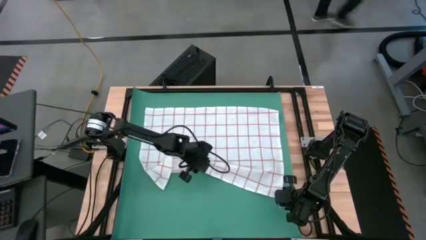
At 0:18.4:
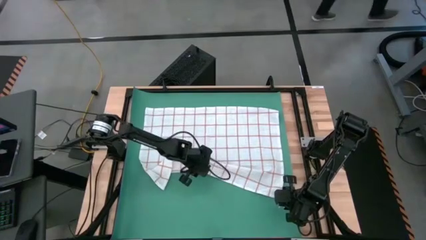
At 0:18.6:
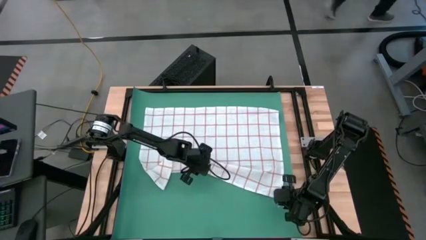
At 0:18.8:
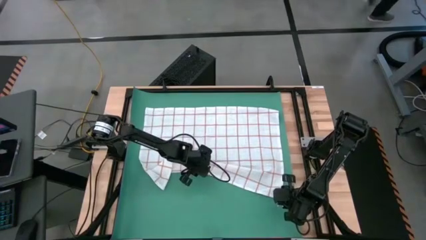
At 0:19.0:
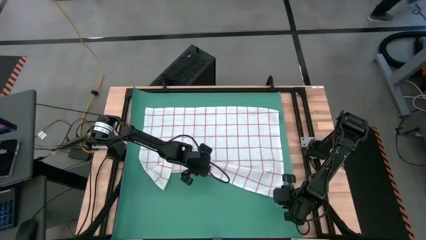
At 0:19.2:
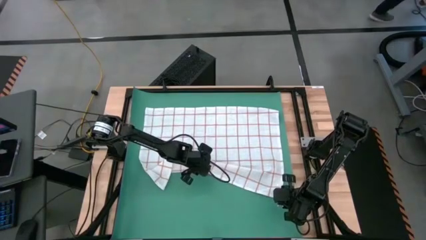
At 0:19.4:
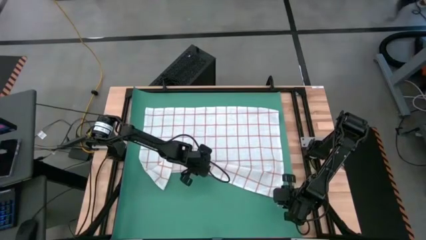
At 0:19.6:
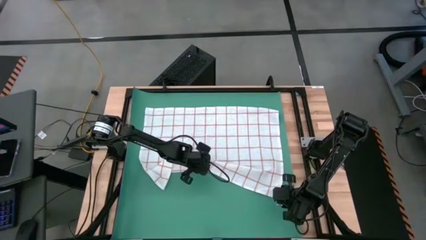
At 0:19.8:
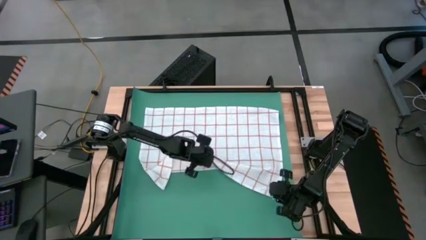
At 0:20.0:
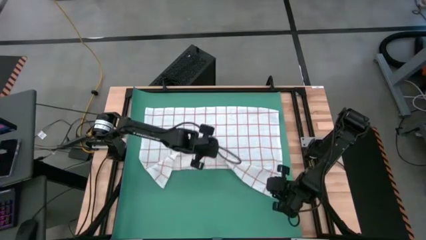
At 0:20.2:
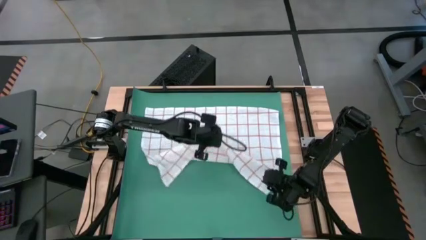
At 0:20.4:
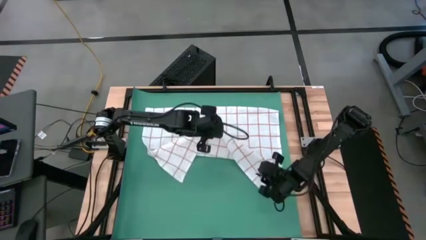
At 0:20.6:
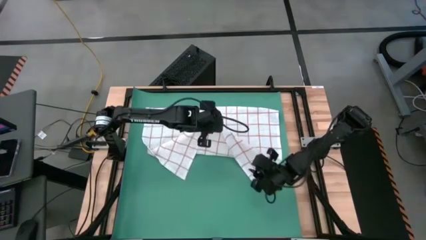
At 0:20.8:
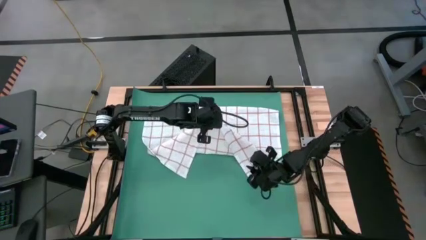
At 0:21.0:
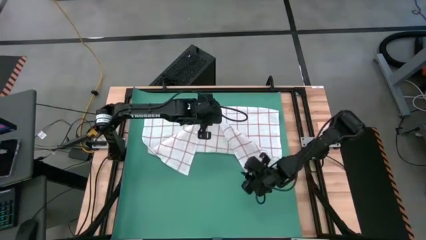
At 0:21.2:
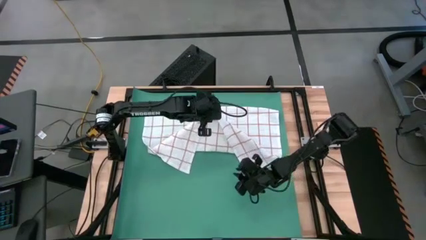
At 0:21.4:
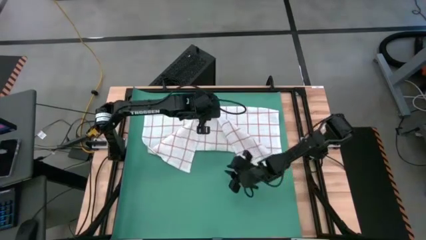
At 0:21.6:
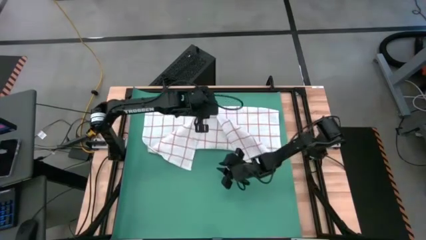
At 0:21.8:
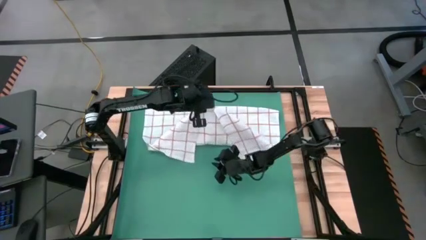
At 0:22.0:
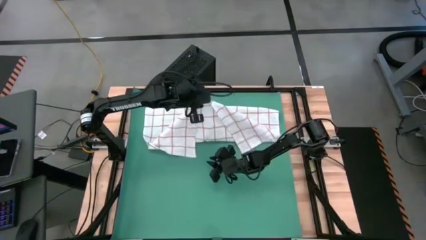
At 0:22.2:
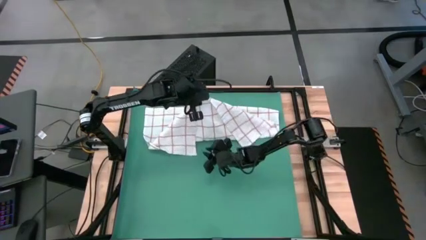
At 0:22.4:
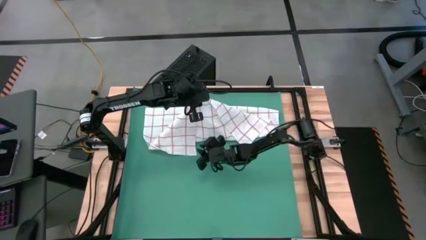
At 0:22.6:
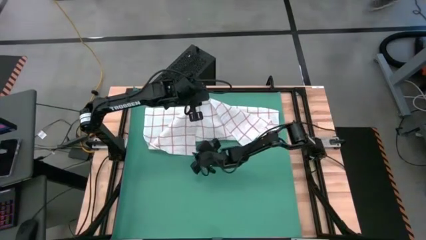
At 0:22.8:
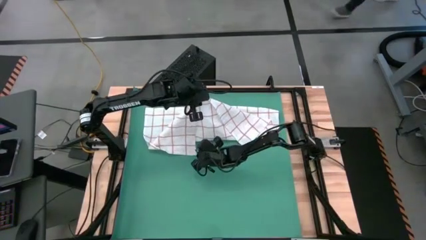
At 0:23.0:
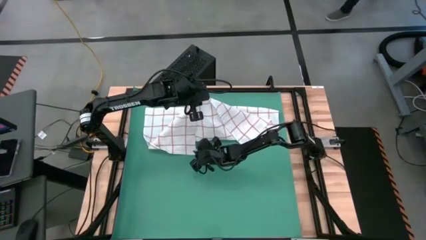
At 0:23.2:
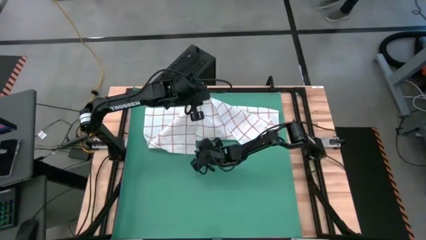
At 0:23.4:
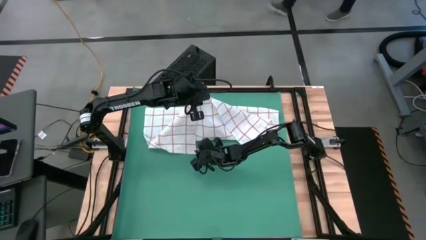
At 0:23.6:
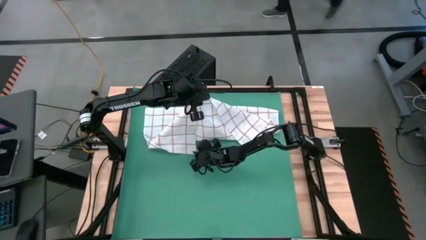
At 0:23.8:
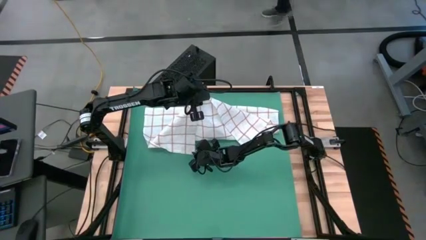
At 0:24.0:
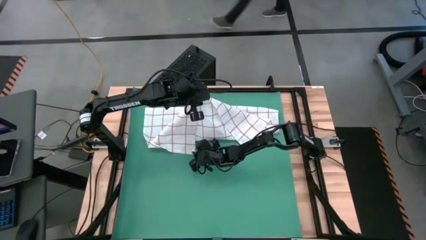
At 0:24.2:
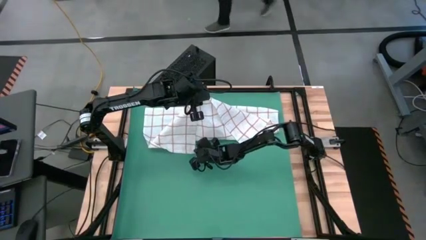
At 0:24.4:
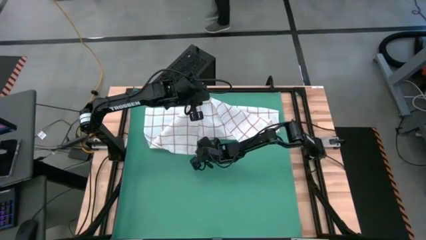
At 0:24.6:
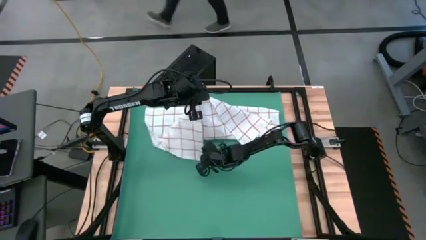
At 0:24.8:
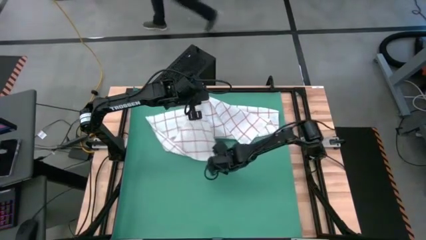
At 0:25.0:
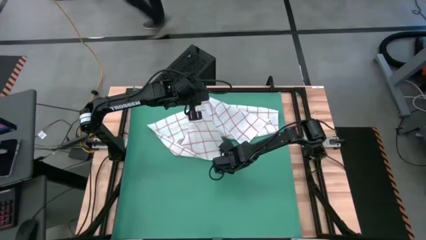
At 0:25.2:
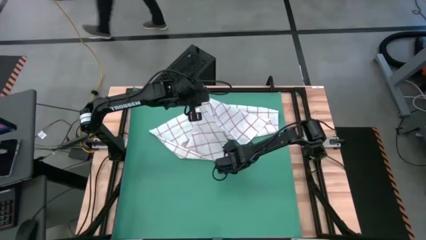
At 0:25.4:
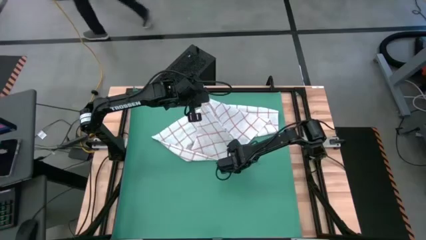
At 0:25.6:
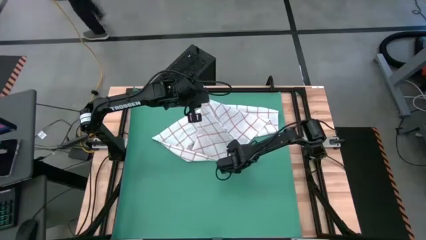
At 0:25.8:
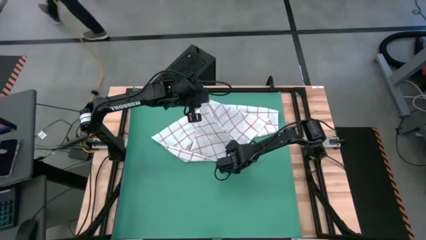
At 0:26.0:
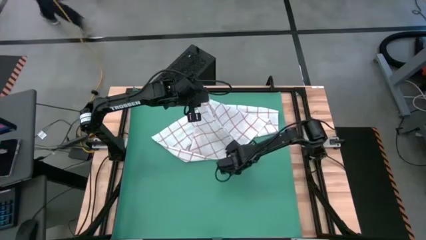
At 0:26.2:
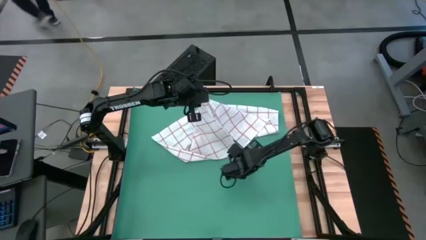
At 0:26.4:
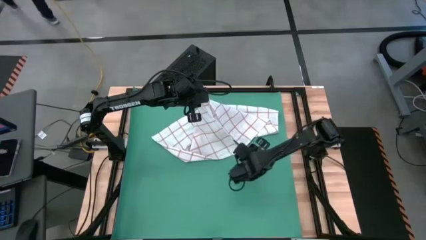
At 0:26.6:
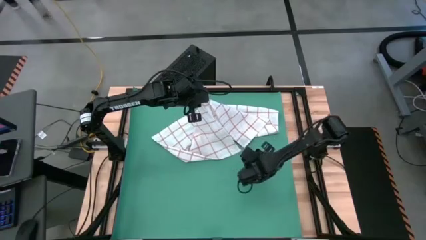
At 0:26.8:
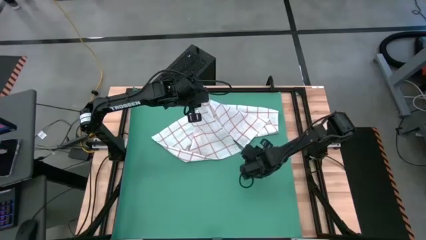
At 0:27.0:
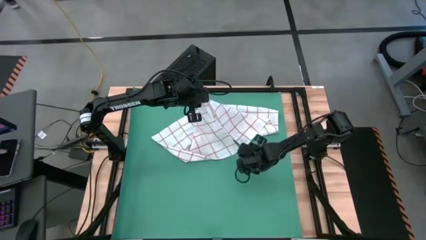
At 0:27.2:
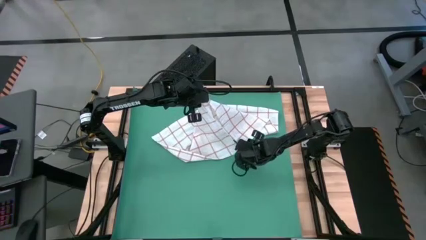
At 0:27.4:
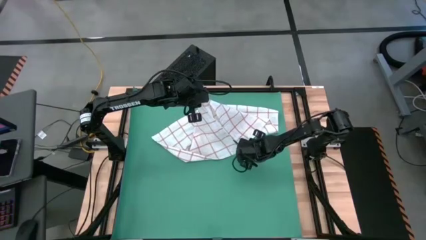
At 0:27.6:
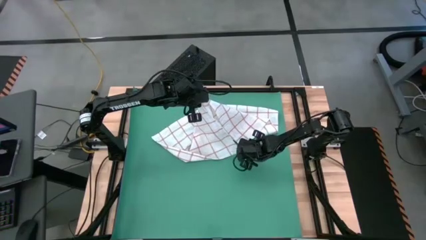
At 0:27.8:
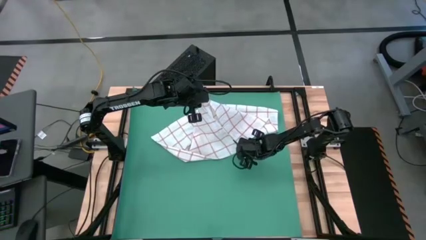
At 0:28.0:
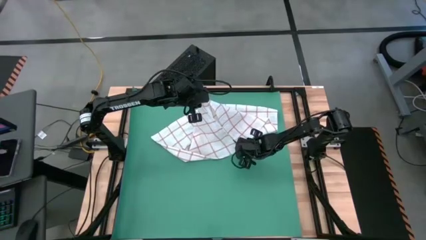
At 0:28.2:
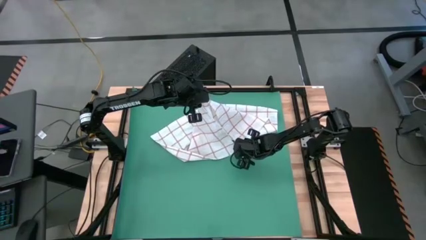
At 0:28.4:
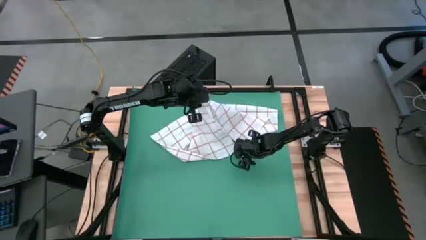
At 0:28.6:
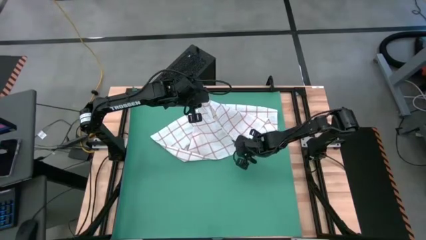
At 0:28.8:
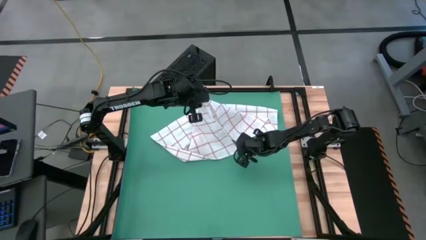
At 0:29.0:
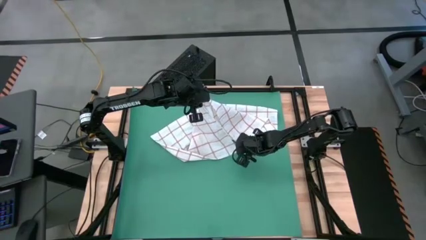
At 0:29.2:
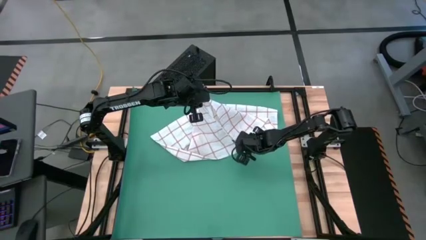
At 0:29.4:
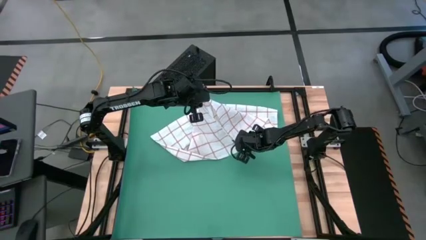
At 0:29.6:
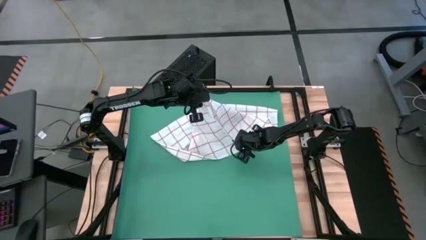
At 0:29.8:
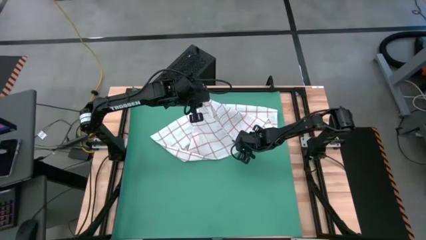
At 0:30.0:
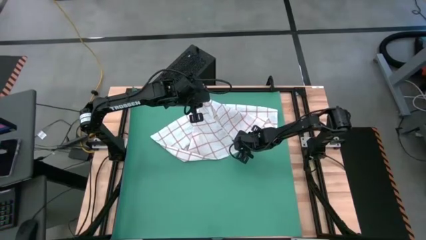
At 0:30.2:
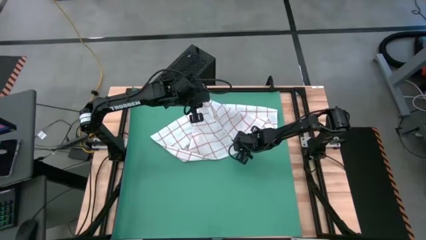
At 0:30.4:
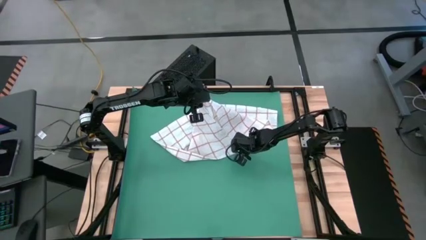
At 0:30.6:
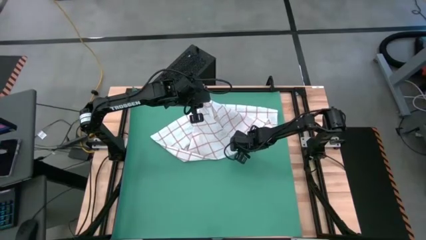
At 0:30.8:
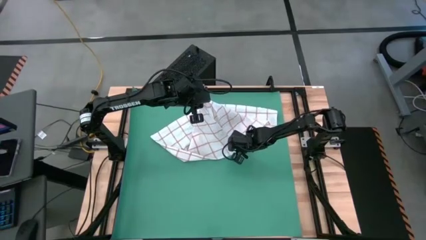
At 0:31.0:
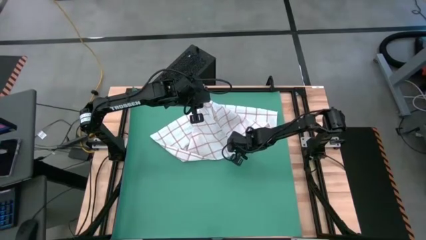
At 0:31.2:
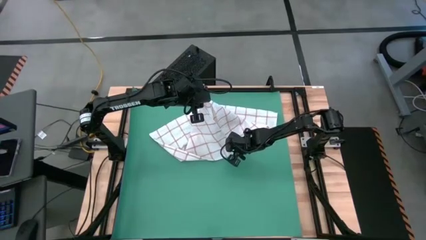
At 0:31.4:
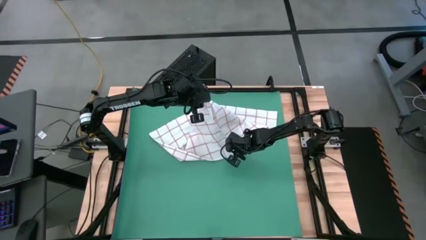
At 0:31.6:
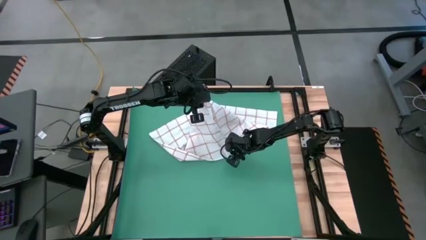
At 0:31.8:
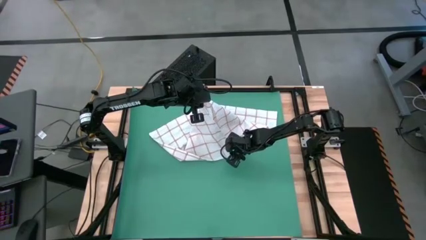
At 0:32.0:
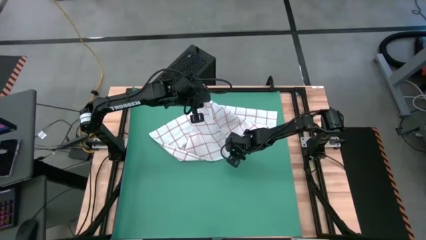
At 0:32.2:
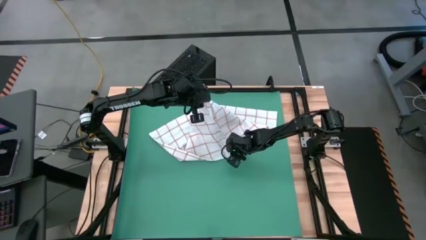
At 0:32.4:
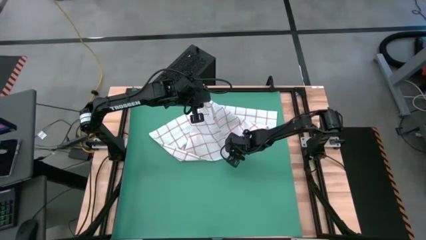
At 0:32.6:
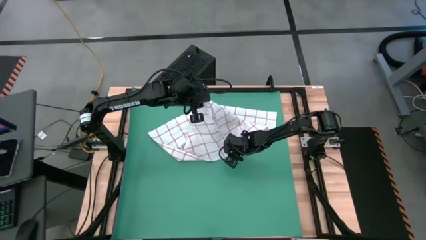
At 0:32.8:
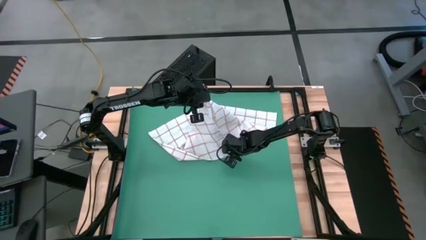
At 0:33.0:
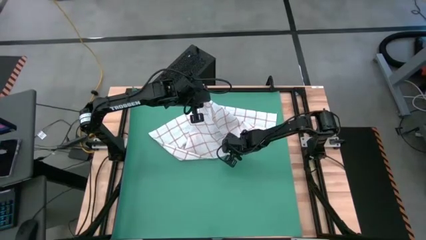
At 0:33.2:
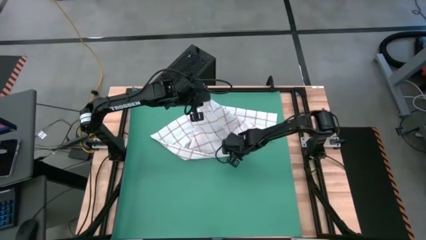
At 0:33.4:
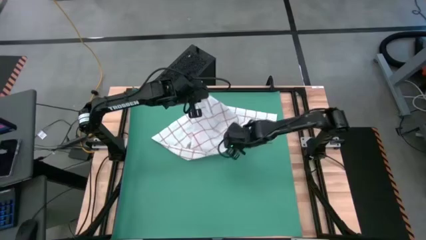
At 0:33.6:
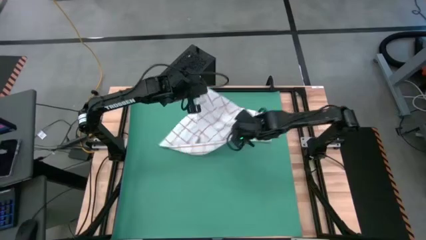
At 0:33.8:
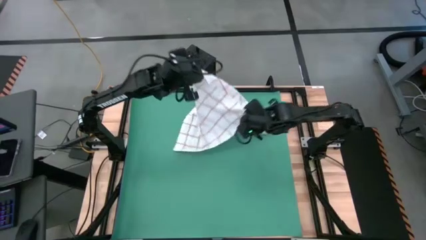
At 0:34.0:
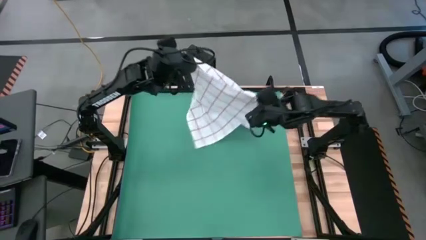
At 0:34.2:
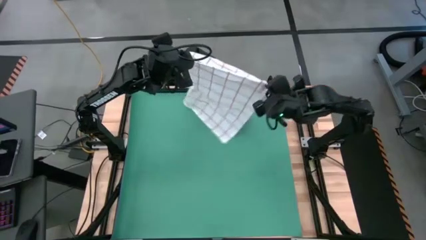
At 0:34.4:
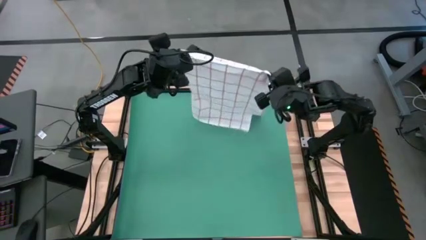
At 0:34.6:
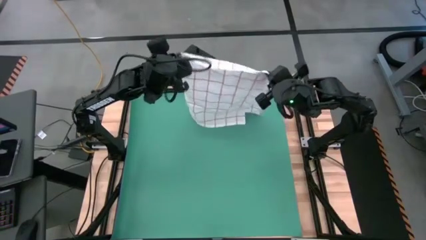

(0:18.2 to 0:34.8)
Task: Roll towel
Roll the white stripe towel
